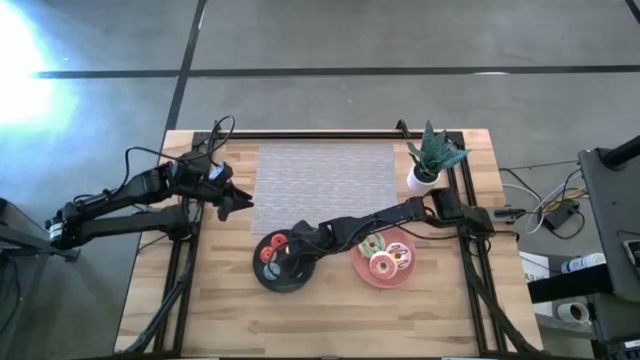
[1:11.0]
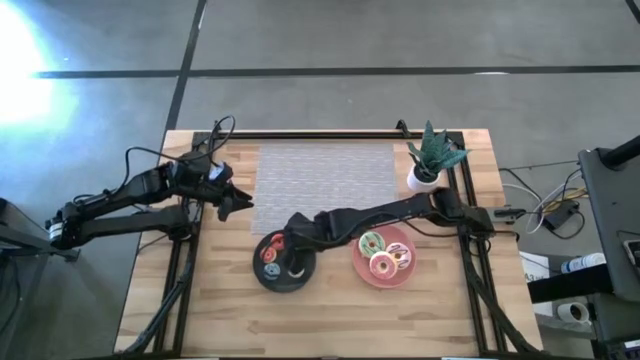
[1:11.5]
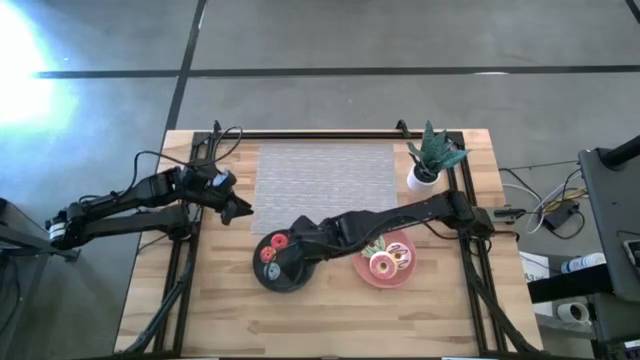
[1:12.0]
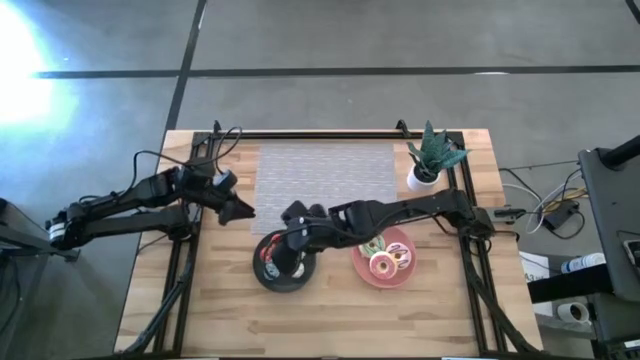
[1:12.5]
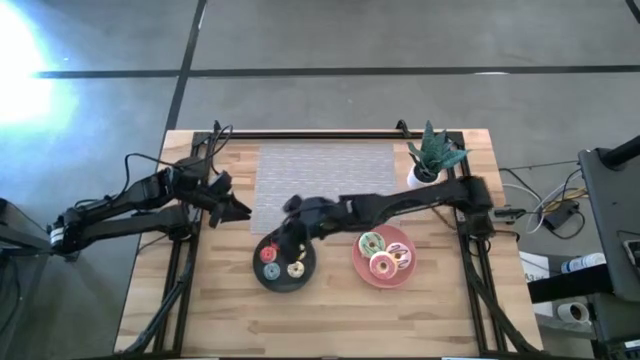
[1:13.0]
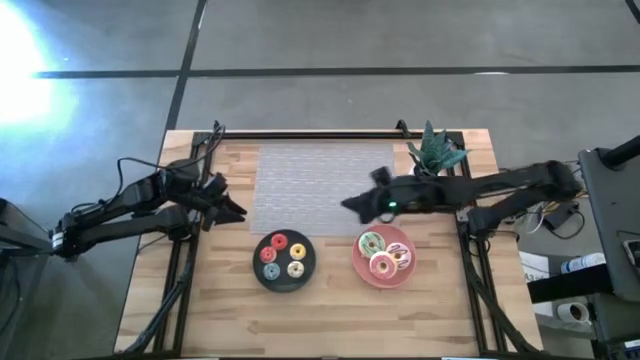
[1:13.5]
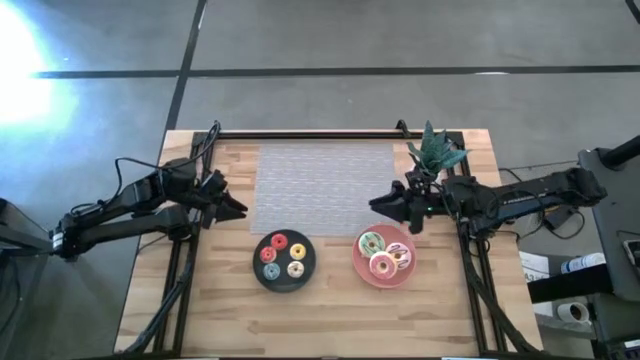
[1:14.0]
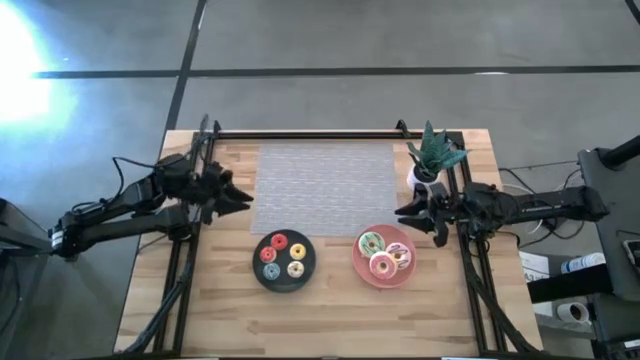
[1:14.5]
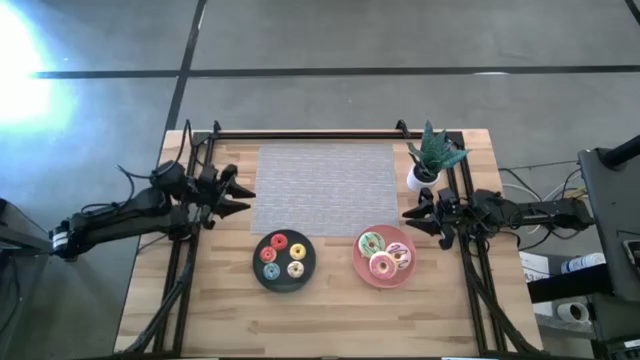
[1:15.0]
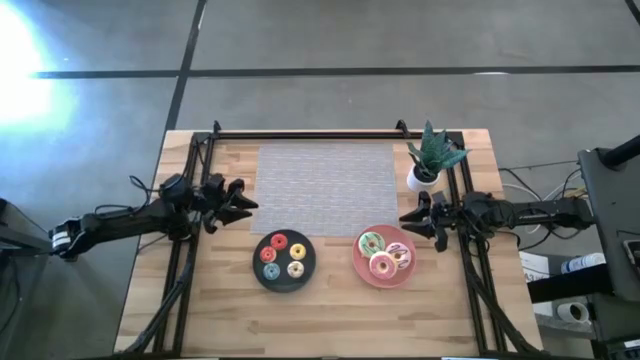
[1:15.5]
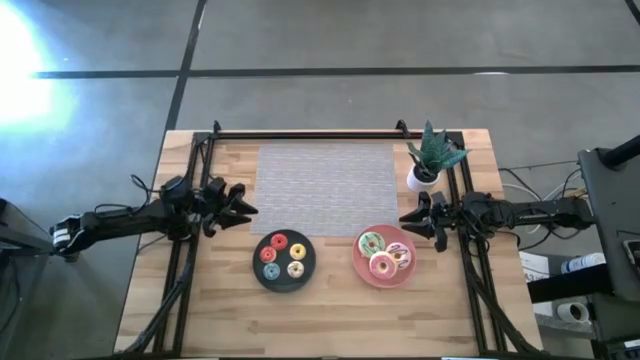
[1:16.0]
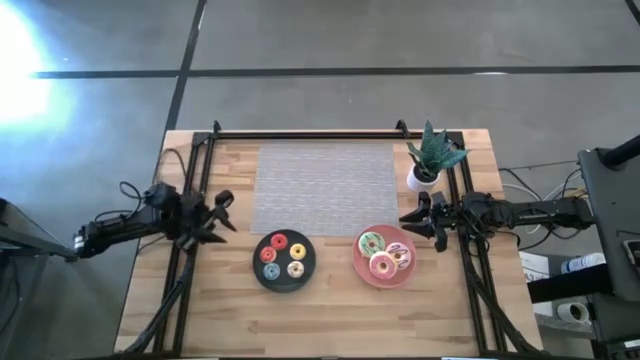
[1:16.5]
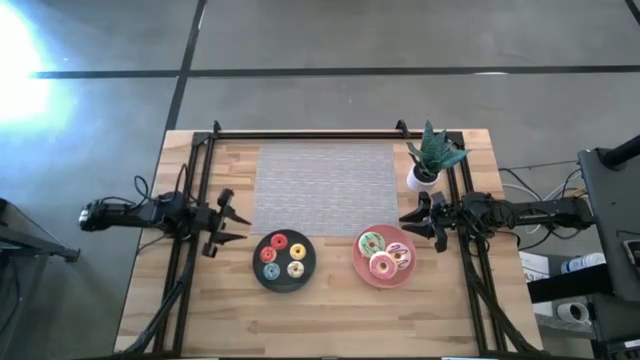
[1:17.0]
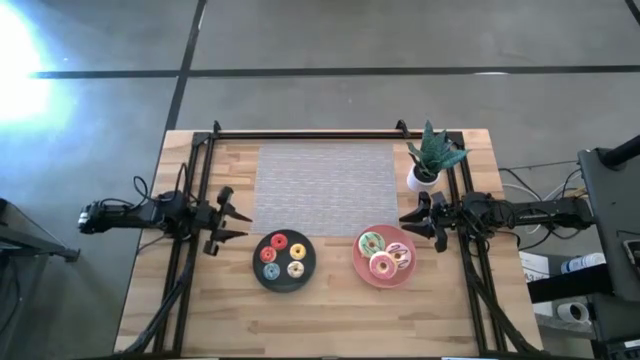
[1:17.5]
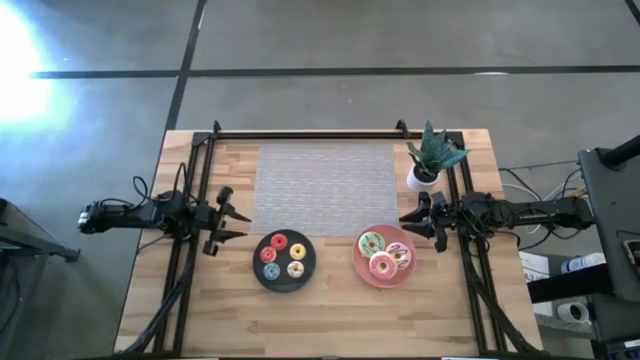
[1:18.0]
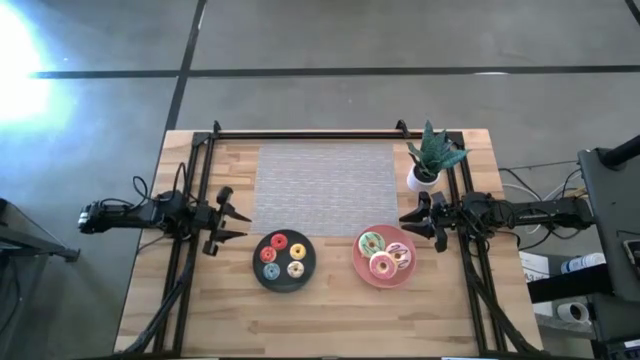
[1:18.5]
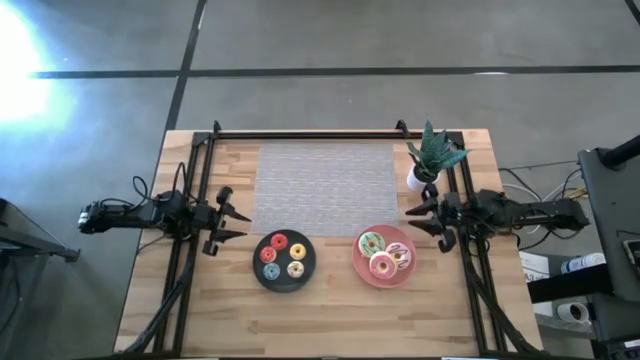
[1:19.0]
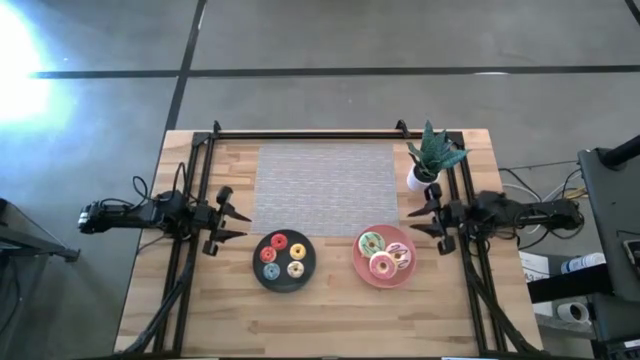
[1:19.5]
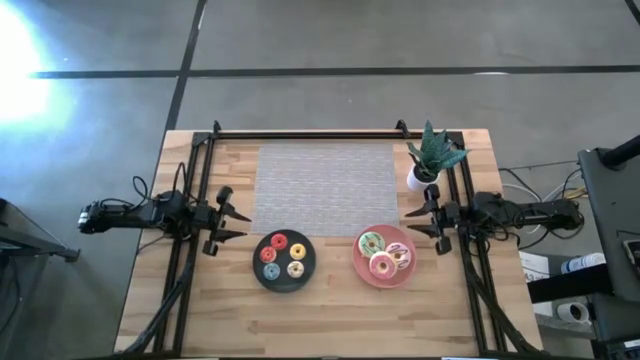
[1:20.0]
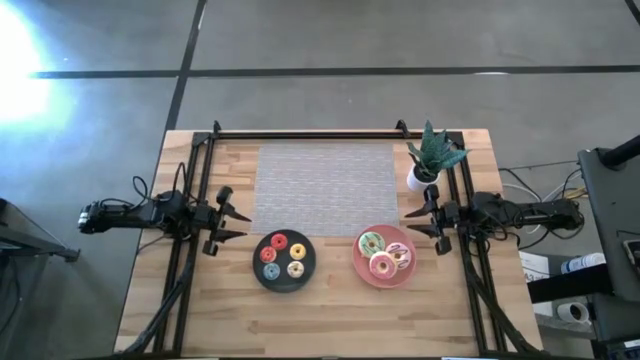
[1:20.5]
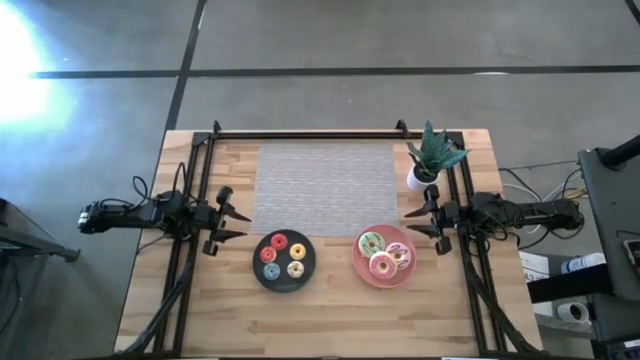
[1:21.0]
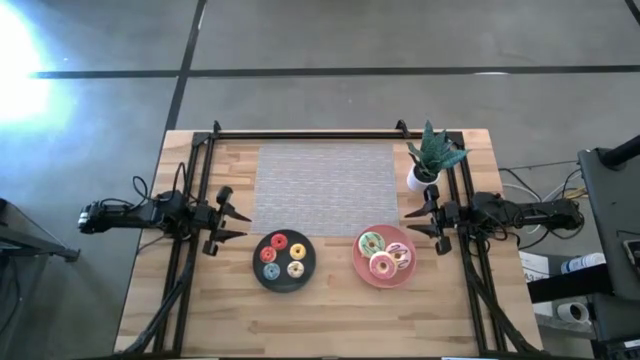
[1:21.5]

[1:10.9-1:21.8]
Task: Pick & Place donuts
Return to Home Position

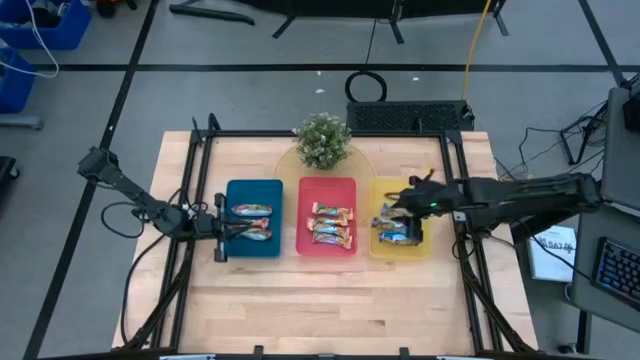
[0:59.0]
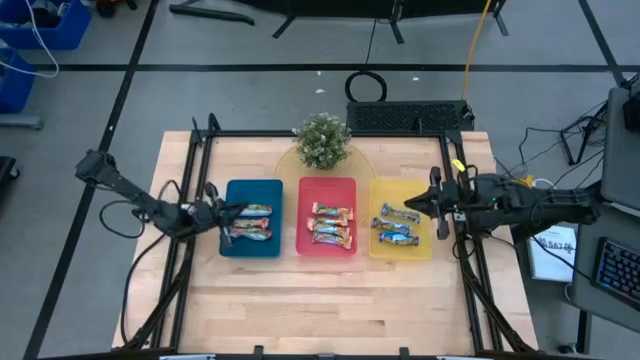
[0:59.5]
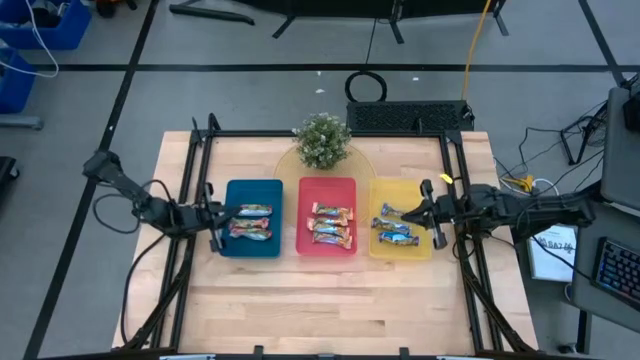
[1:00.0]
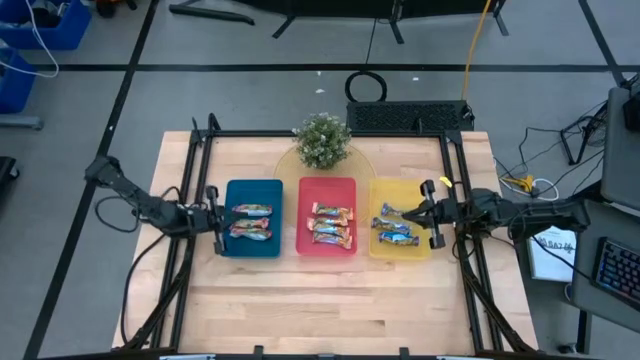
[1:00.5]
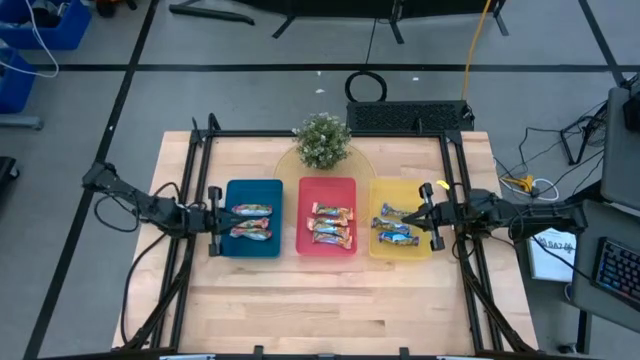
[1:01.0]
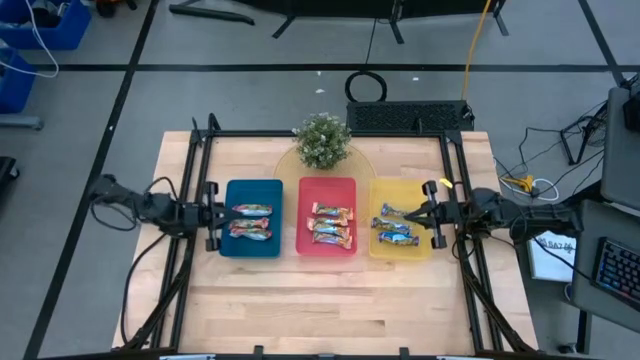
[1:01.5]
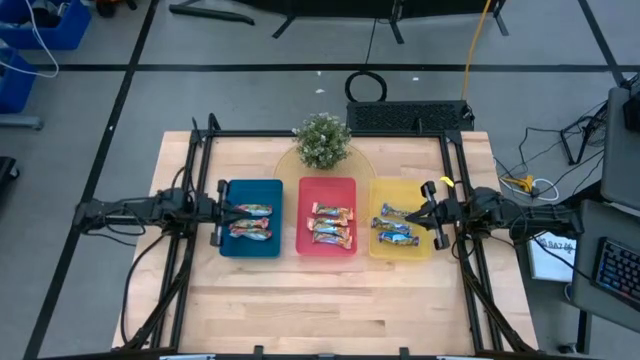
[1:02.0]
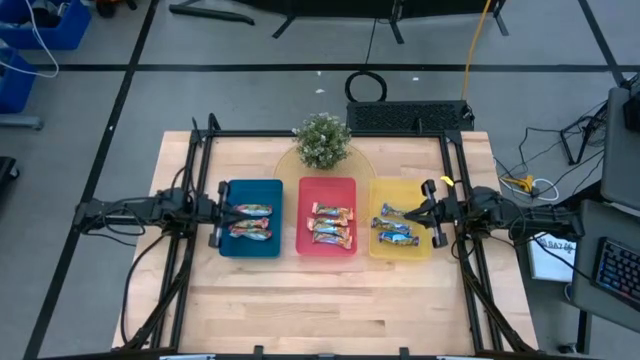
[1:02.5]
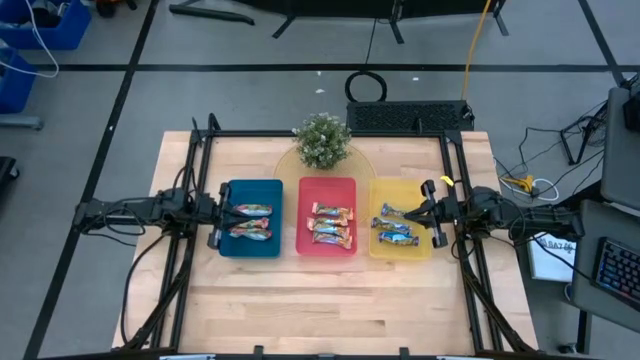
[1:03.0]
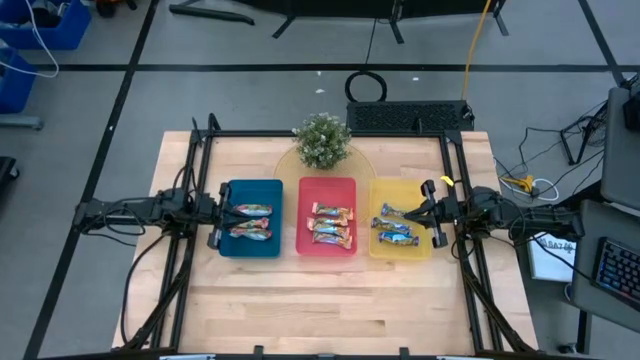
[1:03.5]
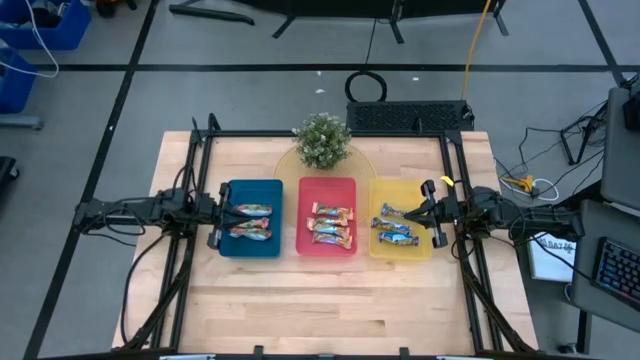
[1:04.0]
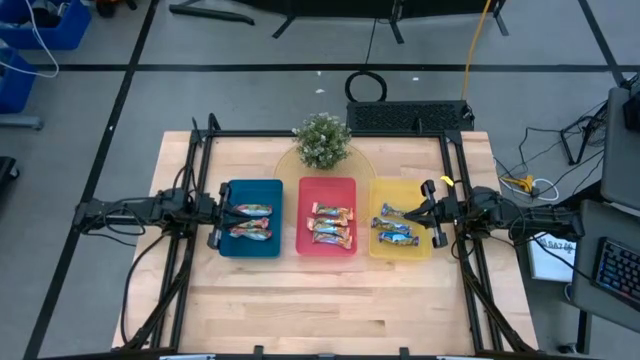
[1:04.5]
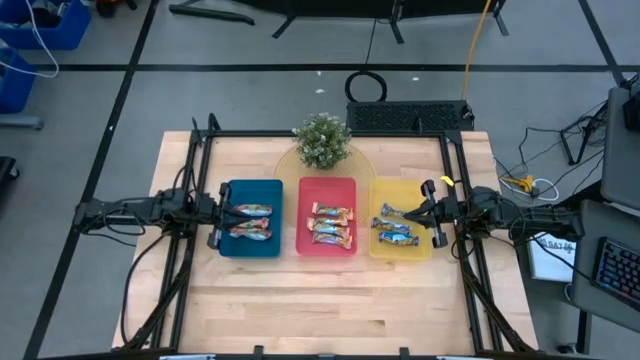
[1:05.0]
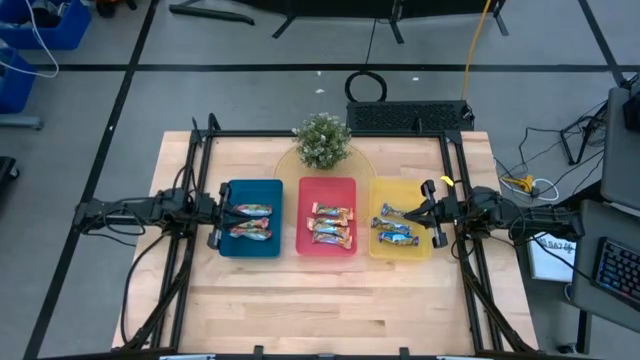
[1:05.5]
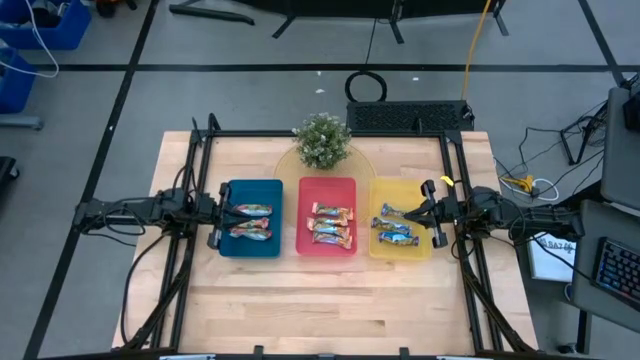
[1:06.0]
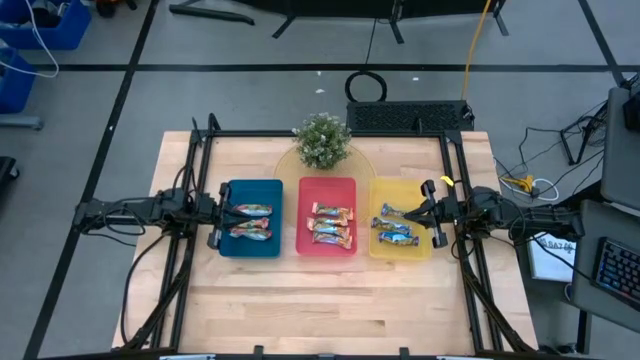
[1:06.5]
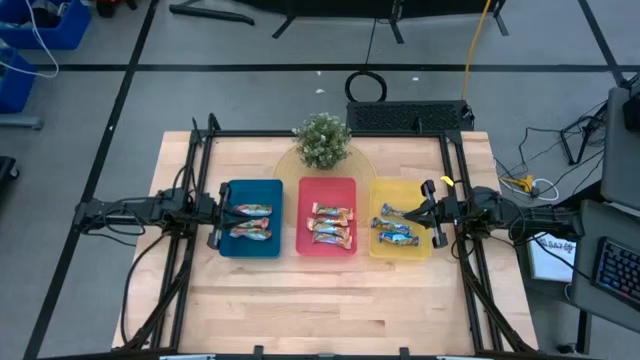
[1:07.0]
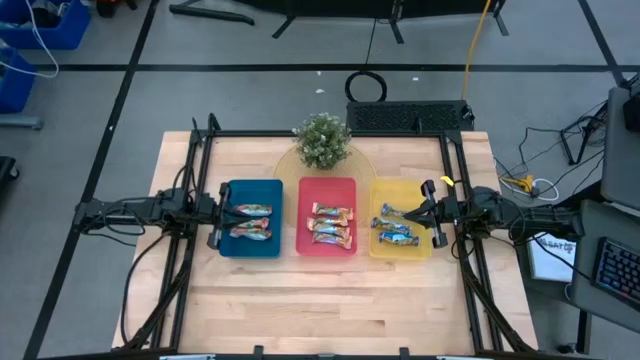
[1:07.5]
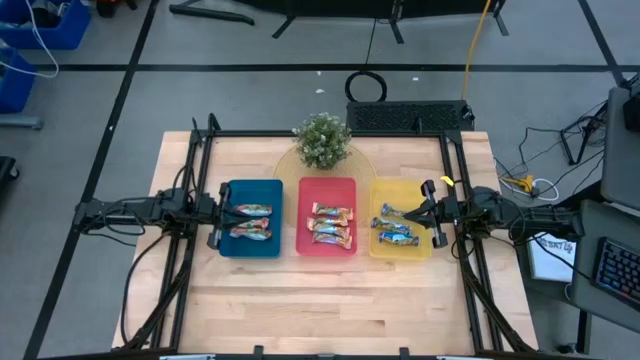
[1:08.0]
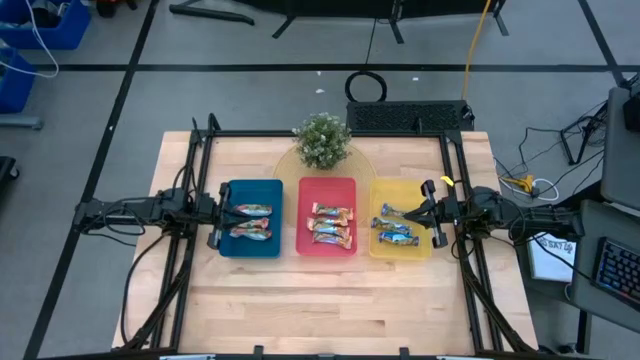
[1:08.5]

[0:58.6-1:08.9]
Task: Pick and place Granola Bars by type
Return to Home Position
